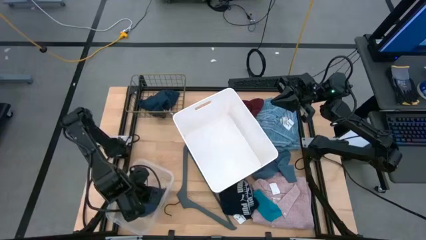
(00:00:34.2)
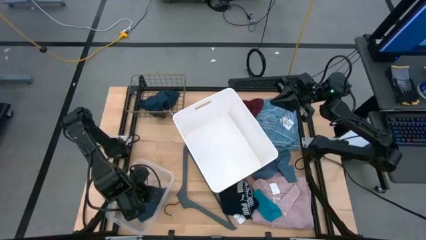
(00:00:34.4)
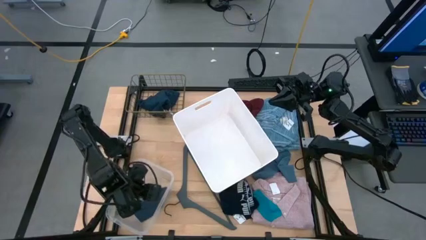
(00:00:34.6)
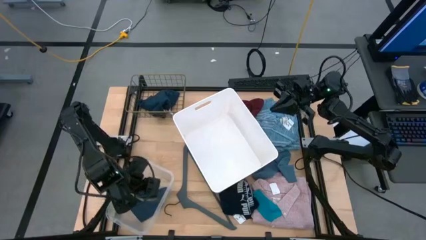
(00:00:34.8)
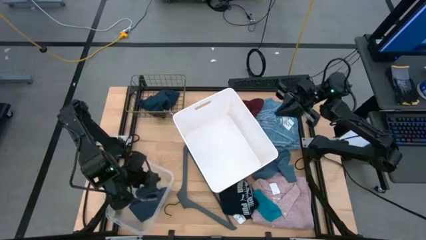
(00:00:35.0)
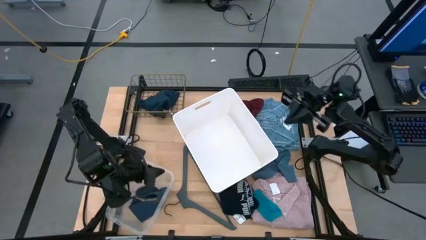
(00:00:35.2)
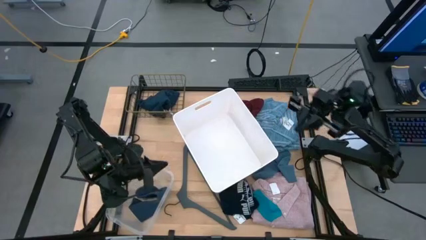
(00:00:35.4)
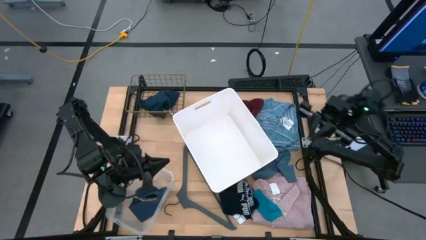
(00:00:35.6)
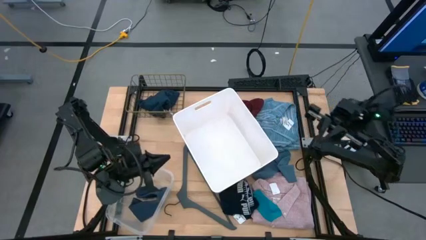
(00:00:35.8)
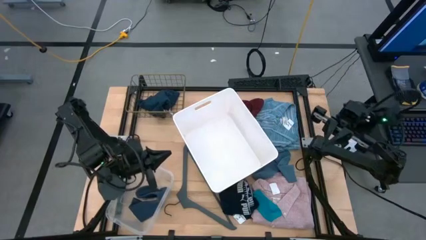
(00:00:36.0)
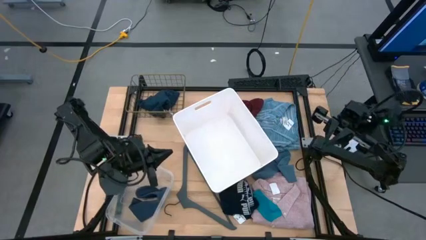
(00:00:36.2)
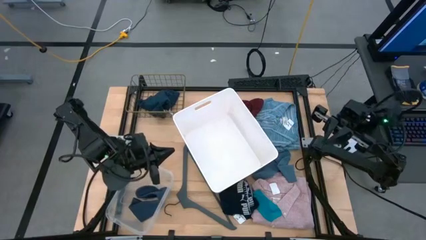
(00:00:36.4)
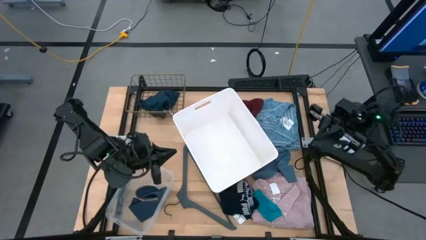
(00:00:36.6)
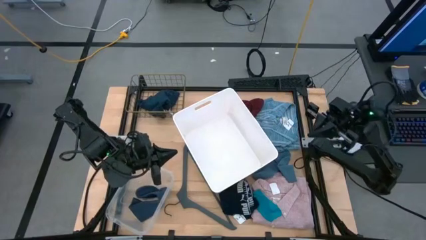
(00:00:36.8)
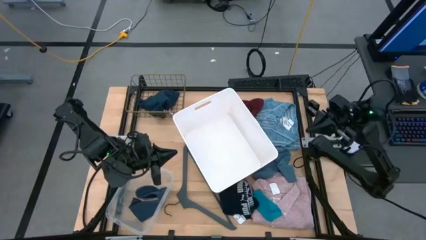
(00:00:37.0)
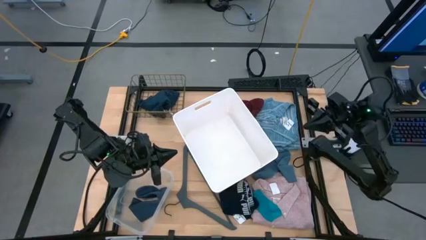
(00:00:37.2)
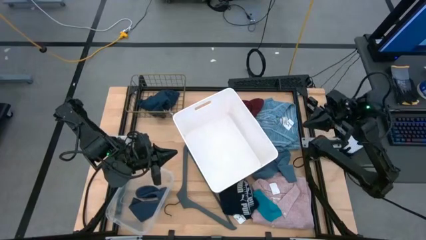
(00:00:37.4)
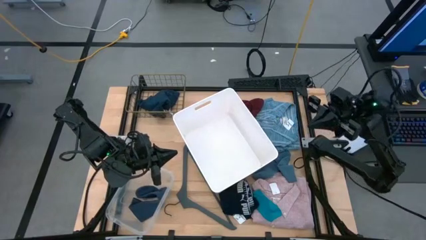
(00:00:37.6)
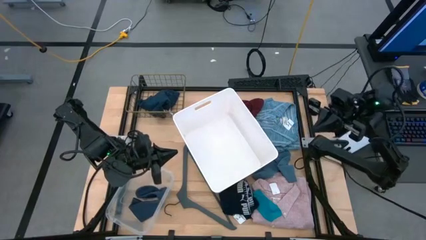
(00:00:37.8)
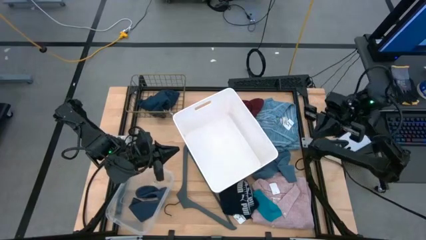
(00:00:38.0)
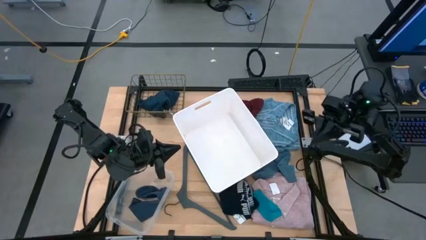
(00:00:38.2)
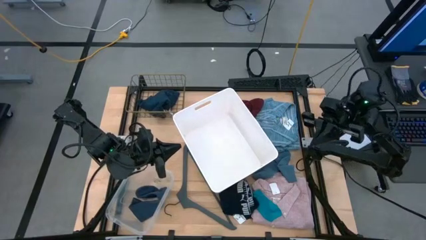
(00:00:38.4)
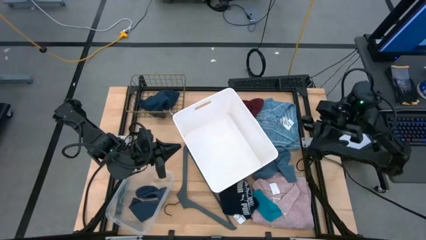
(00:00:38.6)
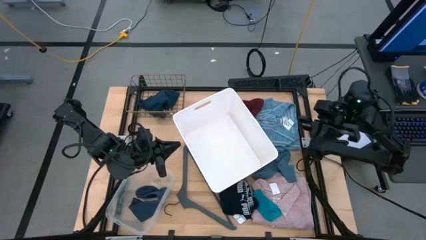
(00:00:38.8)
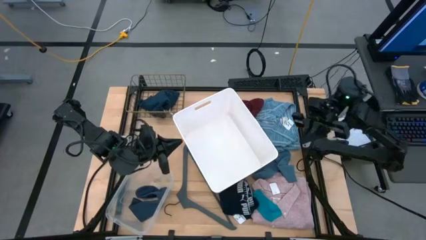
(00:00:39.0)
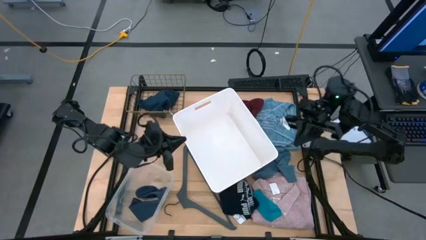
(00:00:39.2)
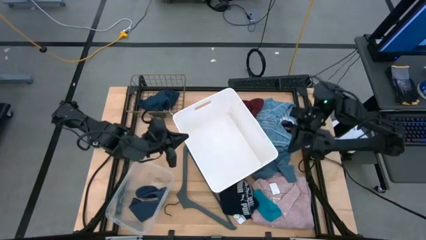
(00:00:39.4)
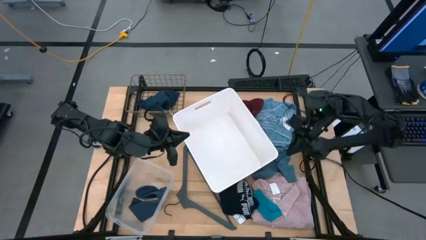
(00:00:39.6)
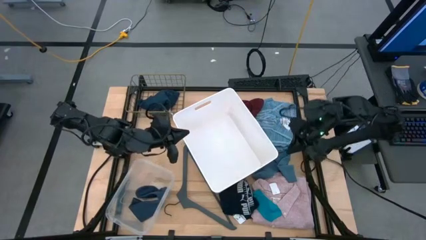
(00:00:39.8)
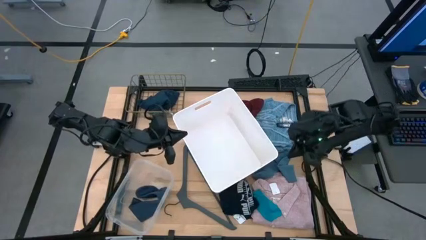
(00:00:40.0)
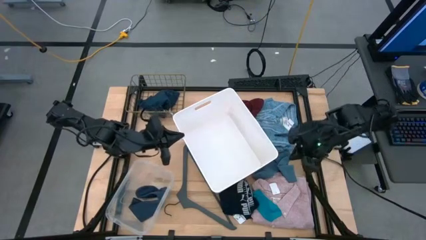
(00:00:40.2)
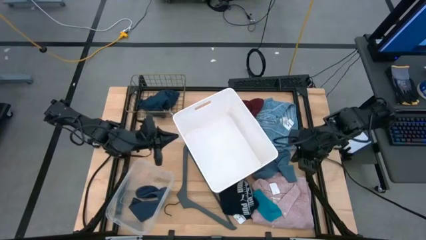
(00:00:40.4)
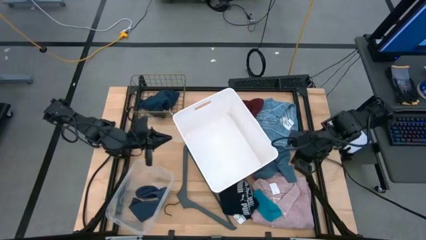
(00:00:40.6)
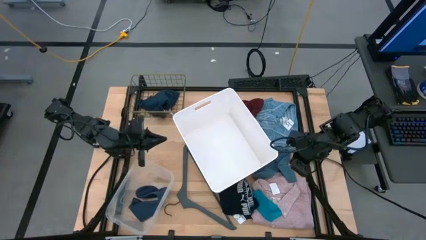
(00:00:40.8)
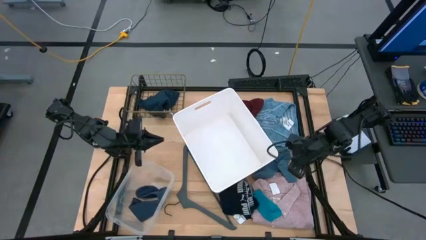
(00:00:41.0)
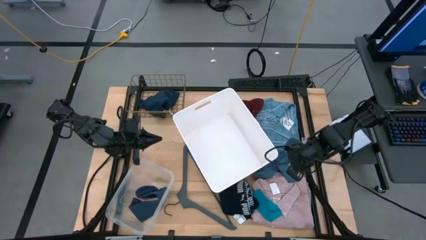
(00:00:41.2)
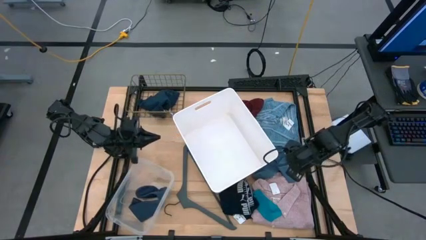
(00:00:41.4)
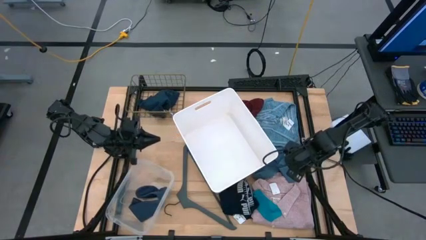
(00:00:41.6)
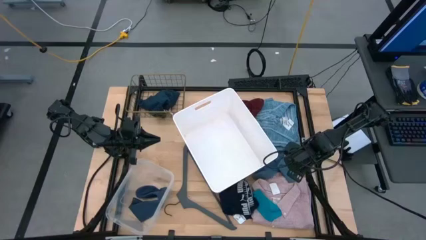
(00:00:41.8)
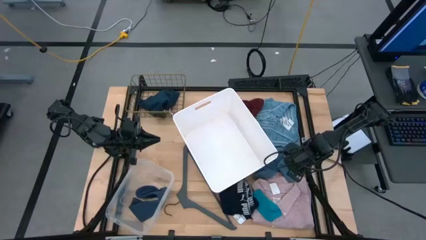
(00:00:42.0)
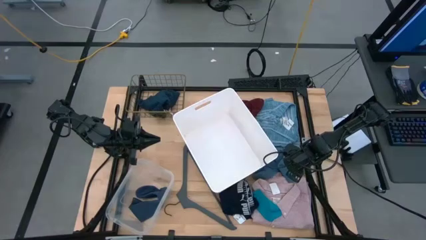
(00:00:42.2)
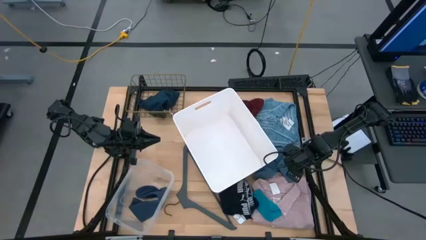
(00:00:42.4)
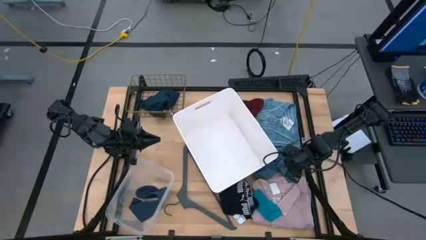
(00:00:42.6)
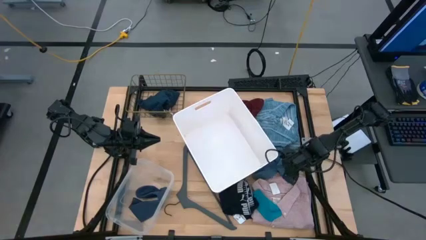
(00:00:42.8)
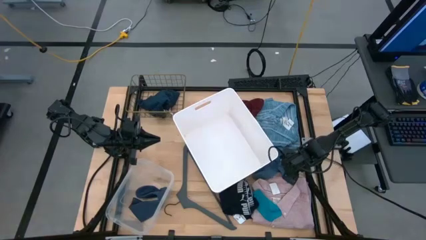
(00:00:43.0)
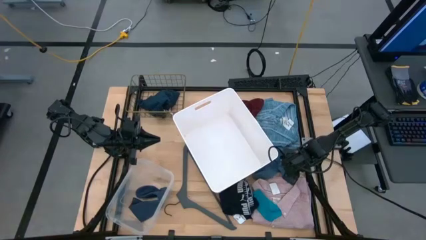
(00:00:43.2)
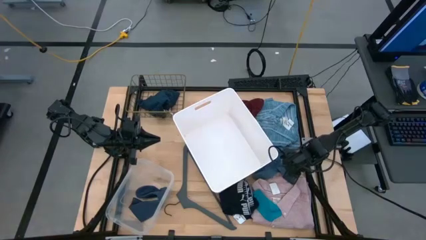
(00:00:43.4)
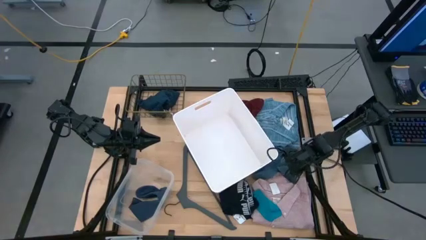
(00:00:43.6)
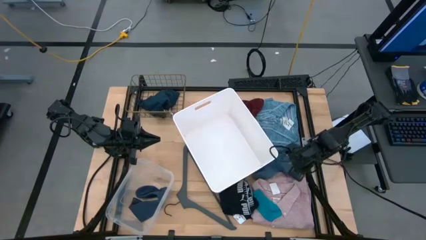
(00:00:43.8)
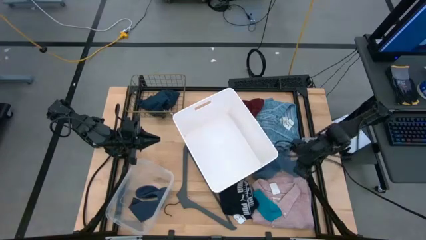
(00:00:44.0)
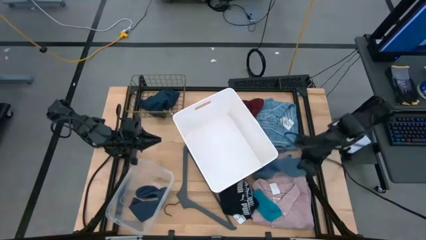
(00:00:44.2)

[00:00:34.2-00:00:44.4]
Task: Pick & Place Cloths
Put the blue sock into the transparent bin
